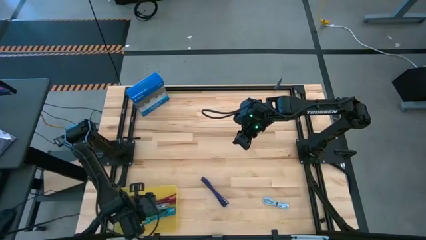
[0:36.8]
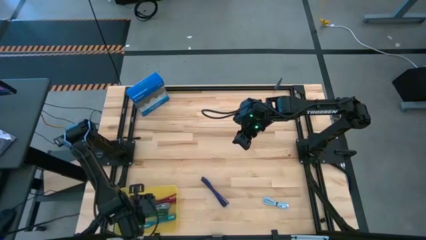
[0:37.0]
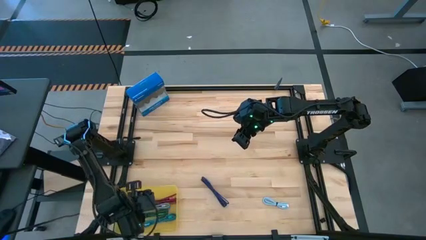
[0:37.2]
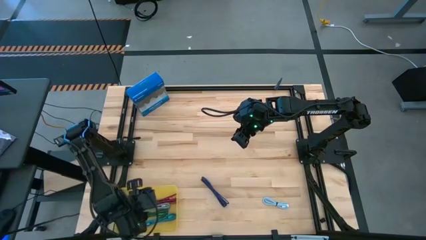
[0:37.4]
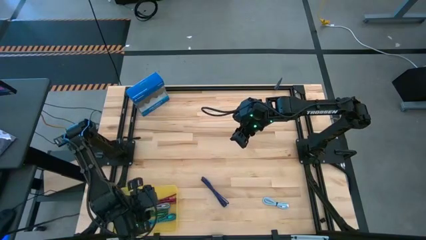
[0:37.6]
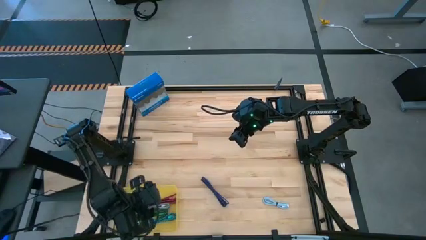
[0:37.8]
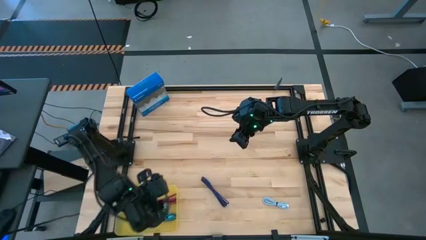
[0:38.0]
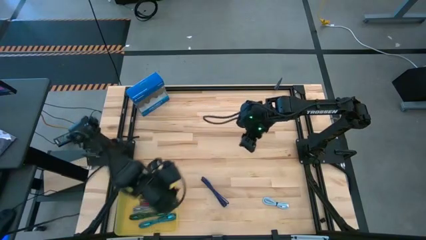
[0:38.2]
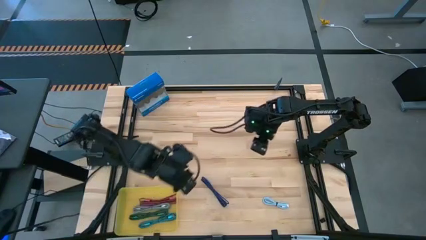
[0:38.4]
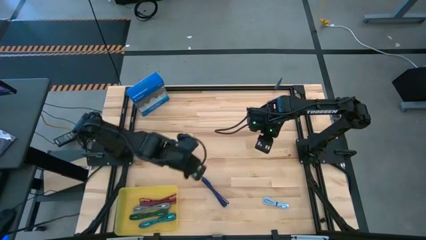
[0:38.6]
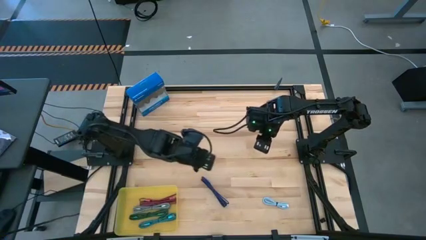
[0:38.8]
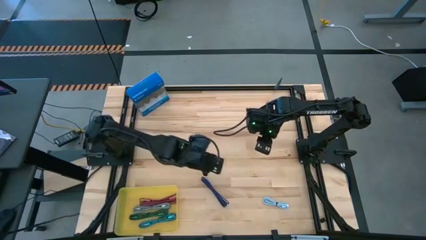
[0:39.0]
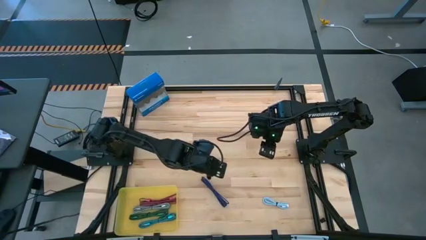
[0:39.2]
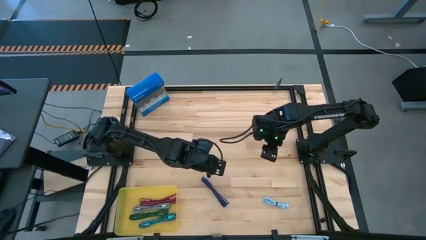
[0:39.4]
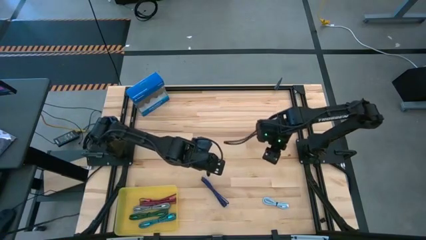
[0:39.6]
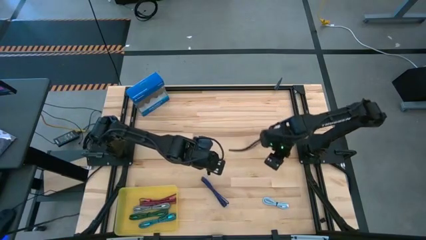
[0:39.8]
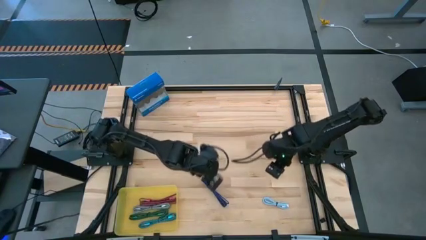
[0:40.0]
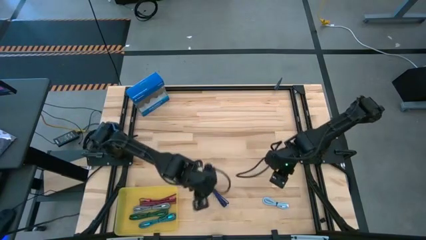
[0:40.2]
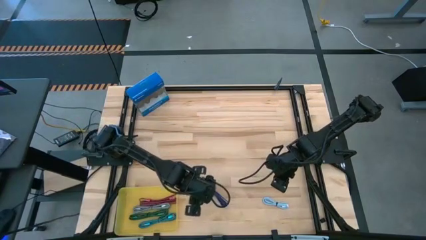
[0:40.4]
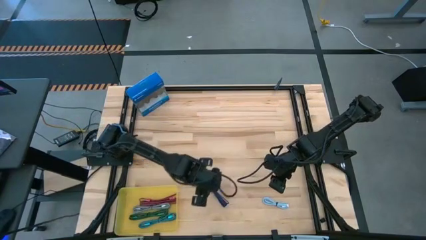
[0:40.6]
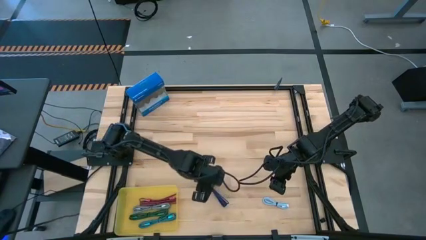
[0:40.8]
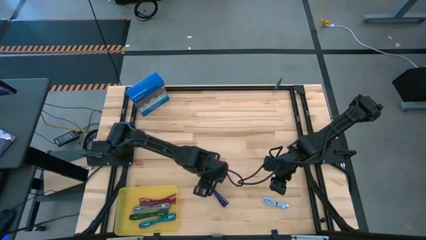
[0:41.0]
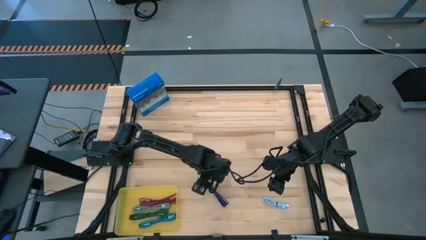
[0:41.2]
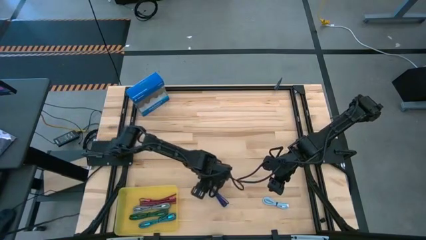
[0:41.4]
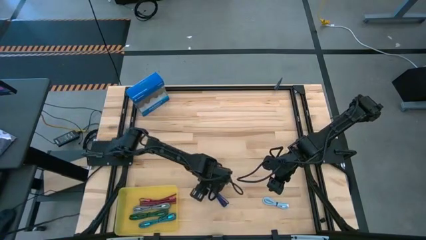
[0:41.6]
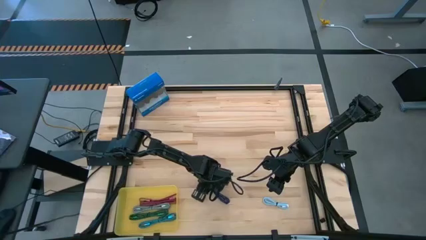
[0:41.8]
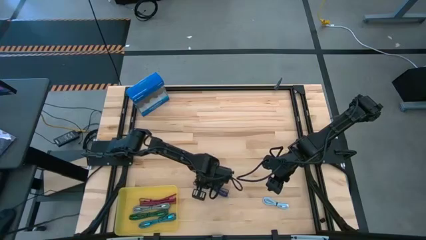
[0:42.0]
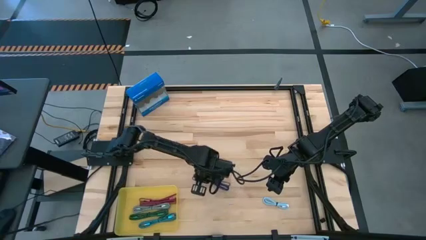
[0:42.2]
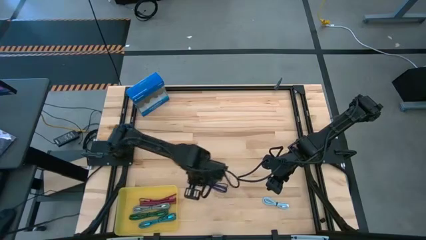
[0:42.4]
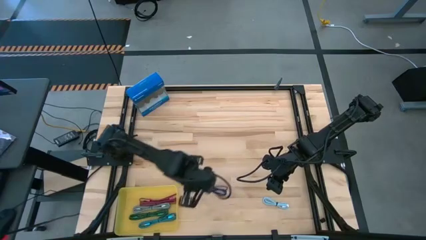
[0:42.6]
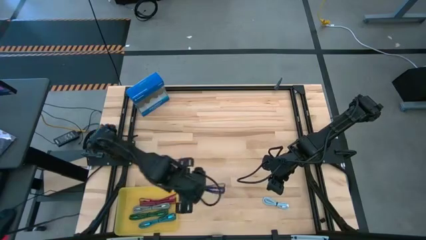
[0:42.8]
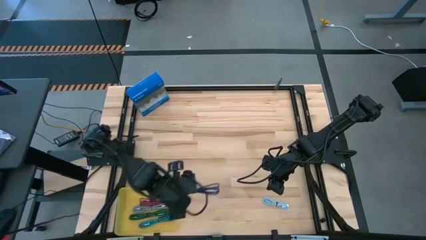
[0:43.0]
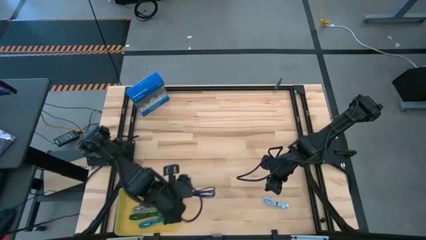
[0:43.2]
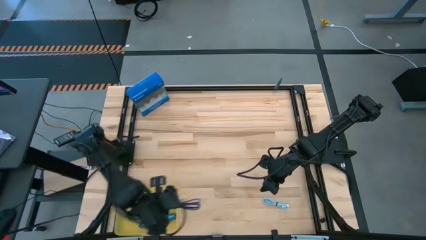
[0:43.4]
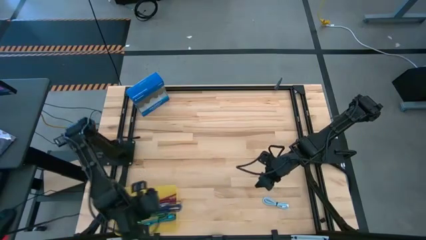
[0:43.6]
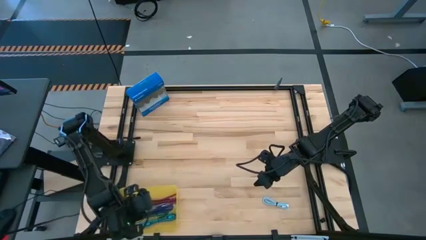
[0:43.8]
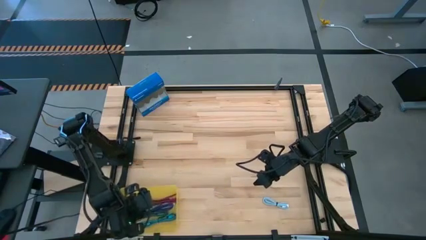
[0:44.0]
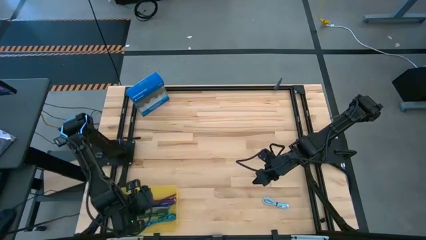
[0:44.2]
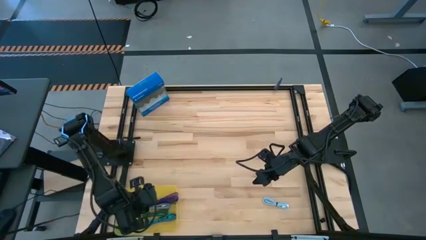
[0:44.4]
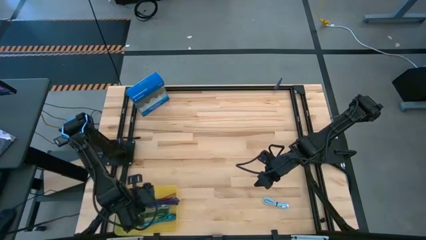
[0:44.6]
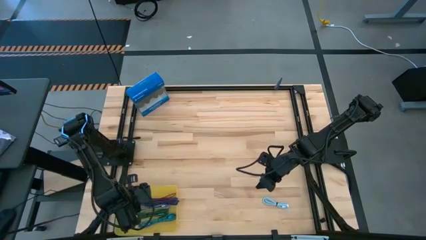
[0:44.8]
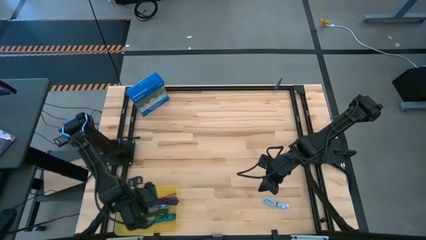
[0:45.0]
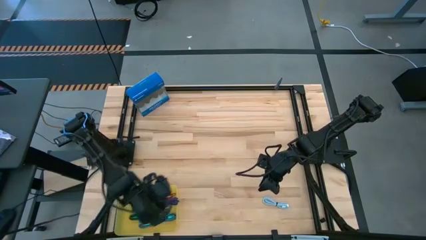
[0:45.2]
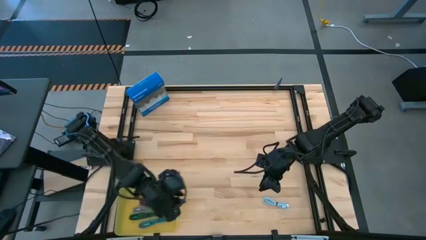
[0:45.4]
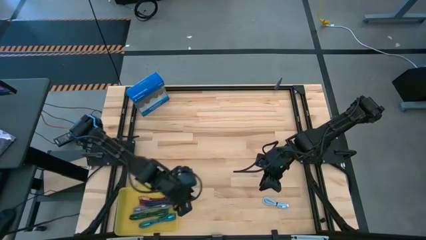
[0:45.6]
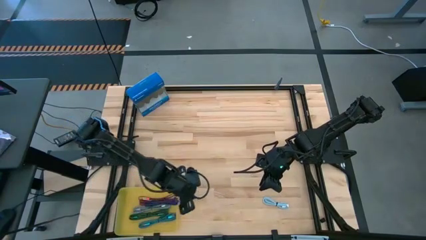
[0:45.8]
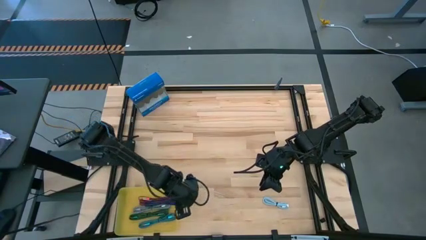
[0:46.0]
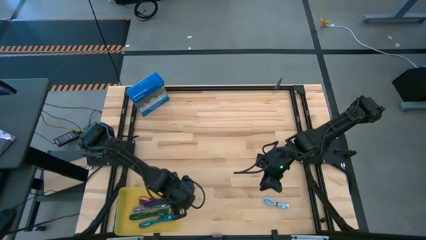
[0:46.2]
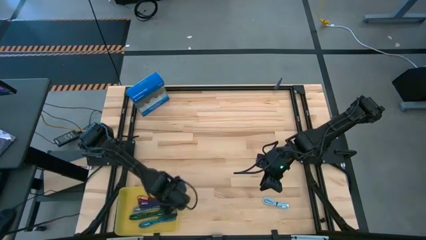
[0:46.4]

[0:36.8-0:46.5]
Task: Pick and place USB-C Cables
Put the purple charger cable into the yellow bin

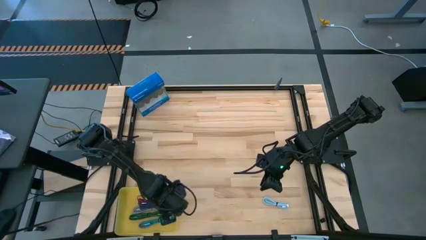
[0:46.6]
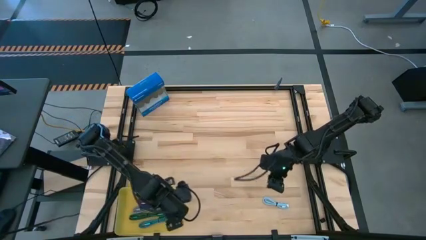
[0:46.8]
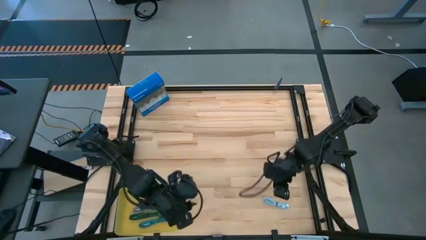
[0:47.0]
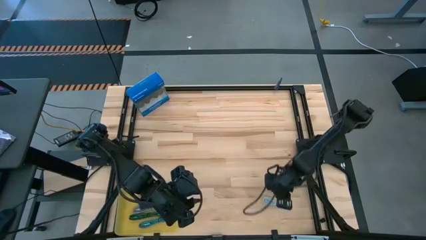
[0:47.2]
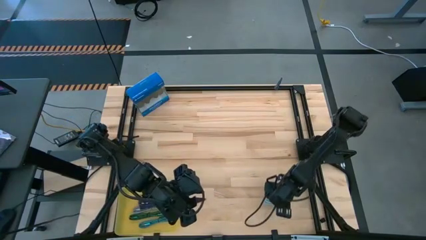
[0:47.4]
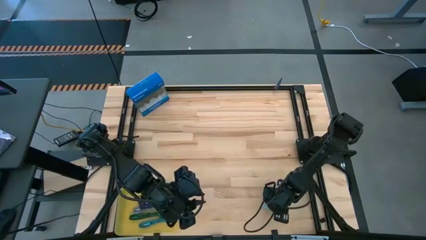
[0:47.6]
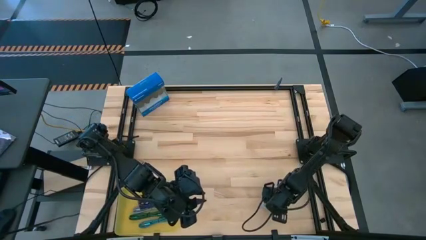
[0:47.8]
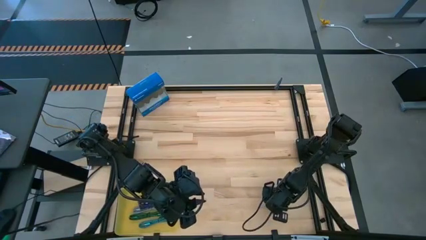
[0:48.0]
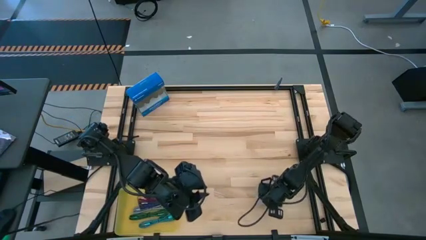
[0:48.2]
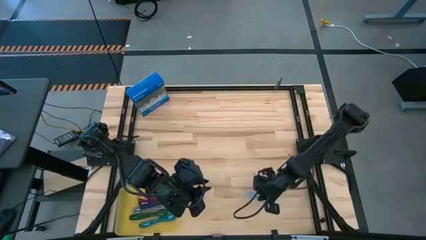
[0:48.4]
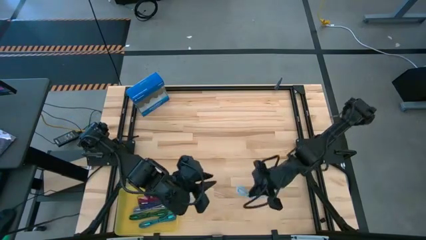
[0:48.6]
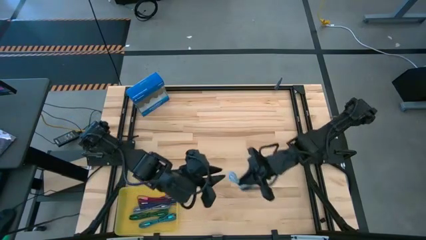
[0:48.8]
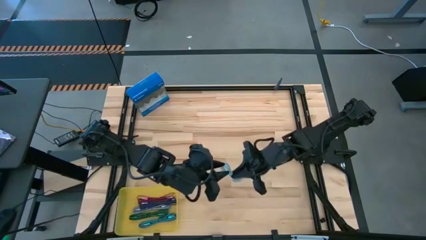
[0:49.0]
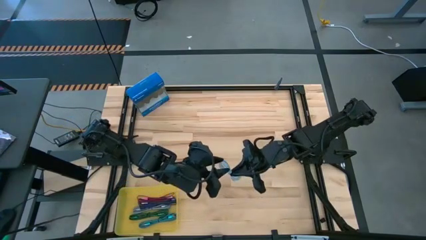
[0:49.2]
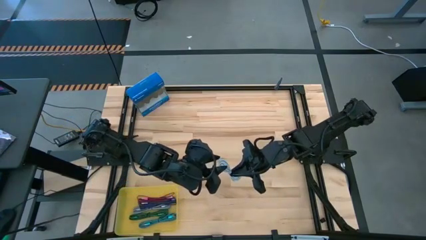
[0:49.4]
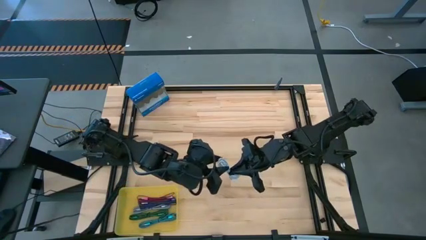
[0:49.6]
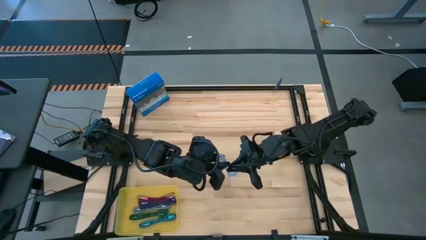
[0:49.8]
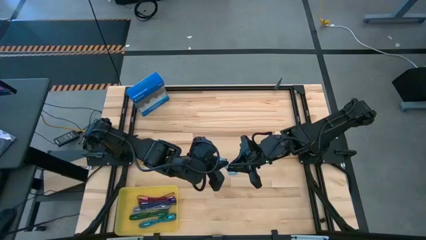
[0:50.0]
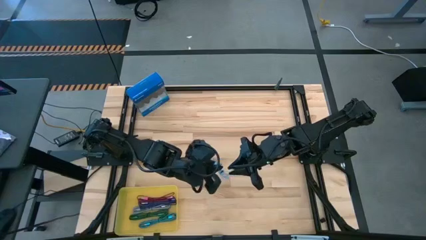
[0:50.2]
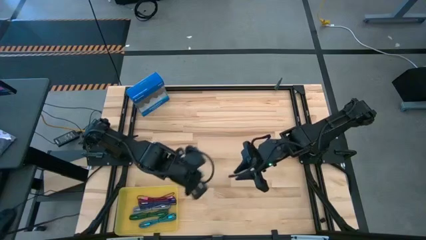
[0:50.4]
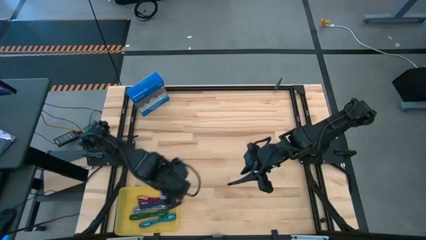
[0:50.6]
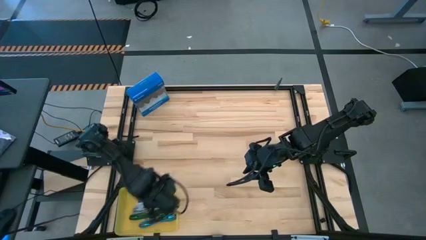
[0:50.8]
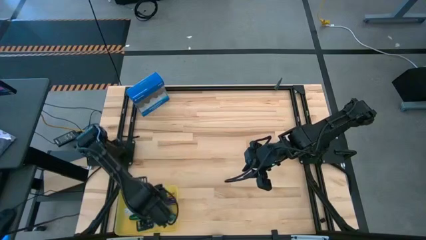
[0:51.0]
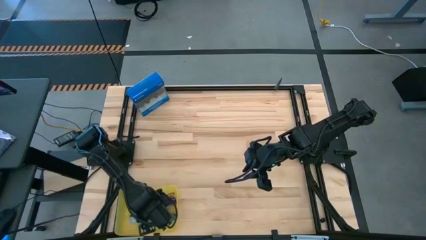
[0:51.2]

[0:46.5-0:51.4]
Put the light blue charger cable into the yellow bin

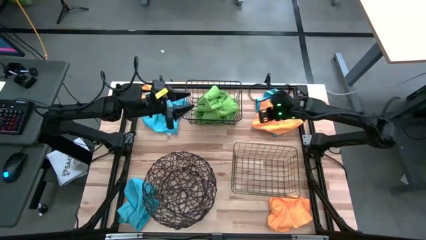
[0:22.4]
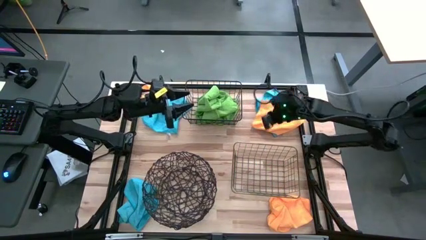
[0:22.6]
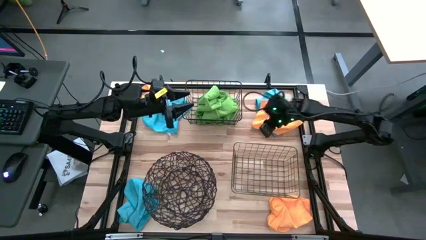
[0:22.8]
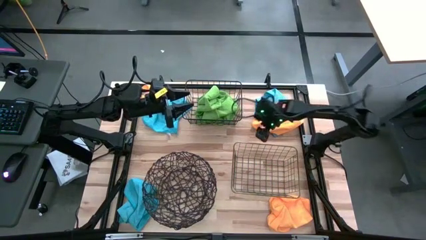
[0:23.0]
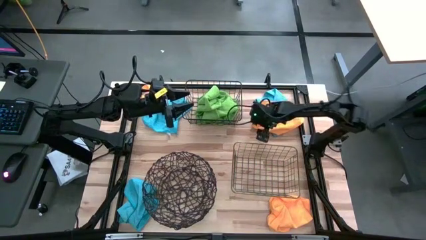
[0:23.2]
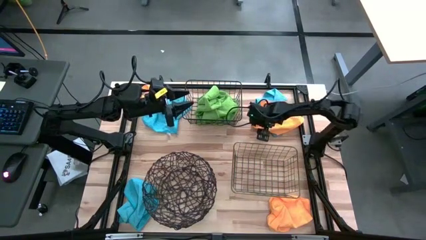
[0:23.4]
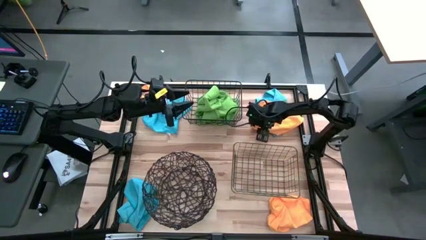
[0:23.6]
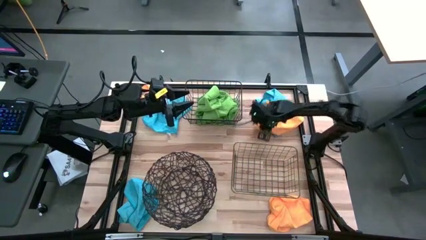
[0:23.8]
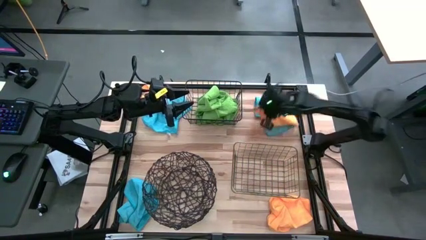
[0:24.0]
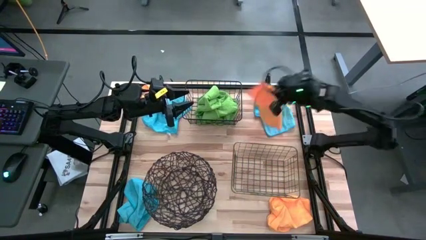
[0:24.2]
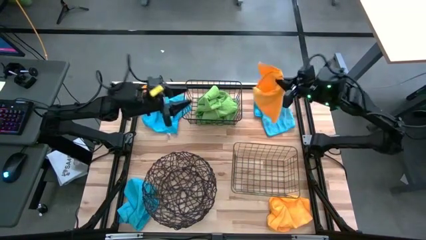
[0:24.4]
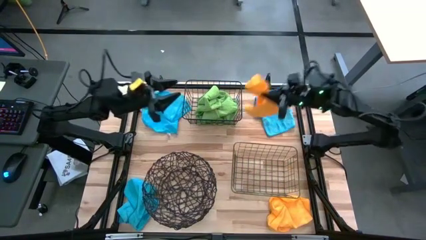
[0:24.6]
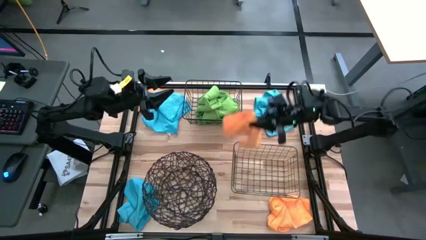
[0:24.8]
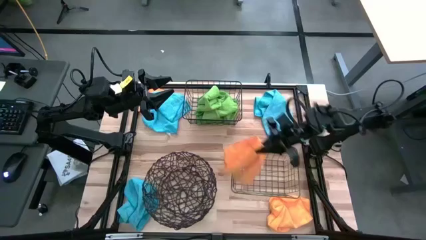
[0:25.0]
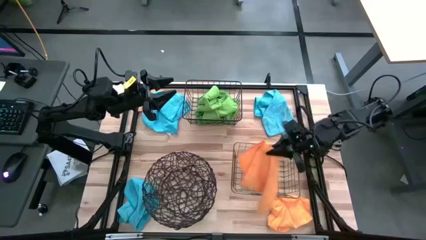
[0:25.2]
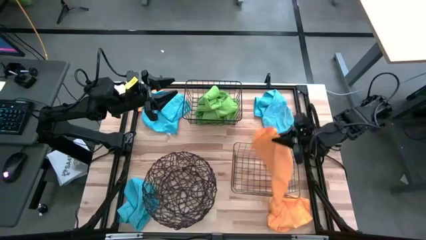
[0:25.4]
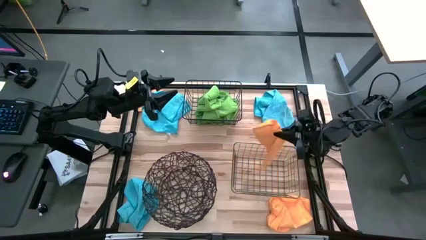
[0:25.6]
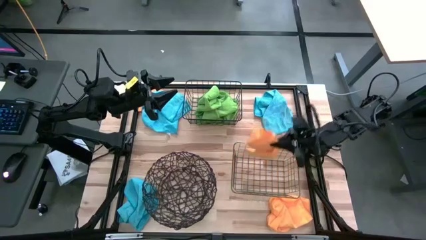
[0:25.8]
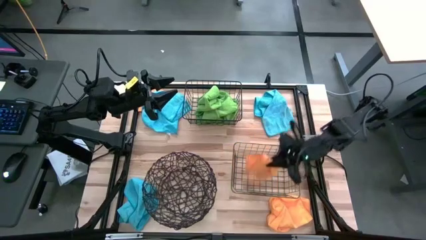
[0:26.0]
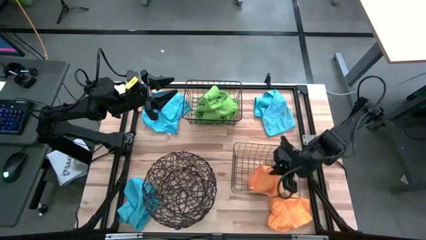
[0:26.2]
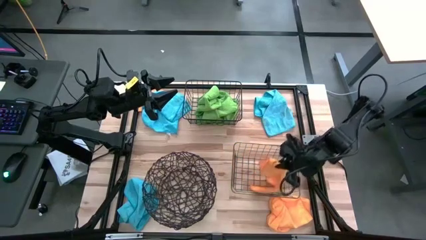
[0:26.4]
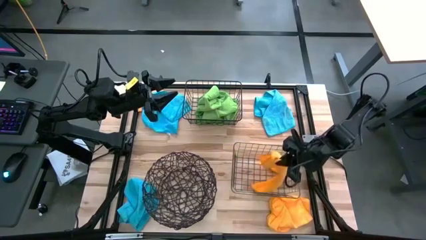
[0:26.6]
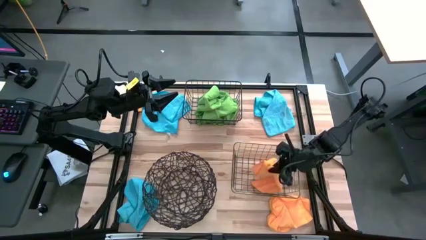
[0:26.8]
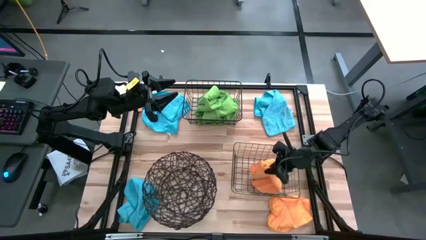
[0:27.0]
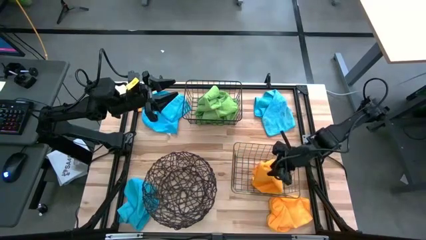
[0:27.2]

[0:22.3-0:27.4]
Task: Sort microfiber towel by color & place in baskets
Put the top right orange towel into the bottom wire basket
